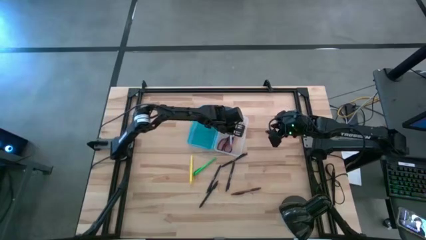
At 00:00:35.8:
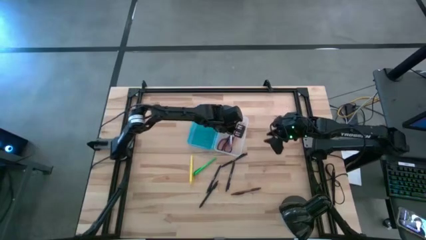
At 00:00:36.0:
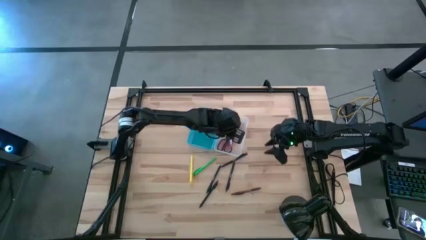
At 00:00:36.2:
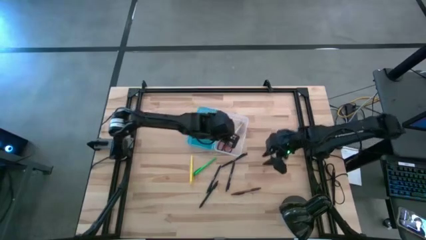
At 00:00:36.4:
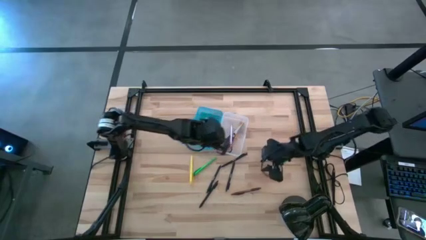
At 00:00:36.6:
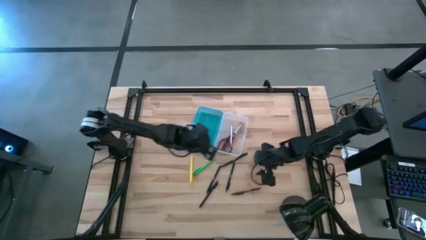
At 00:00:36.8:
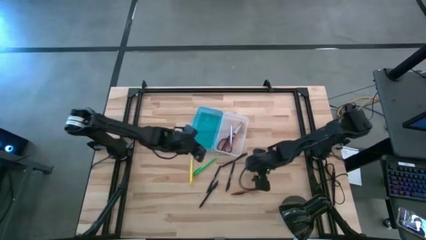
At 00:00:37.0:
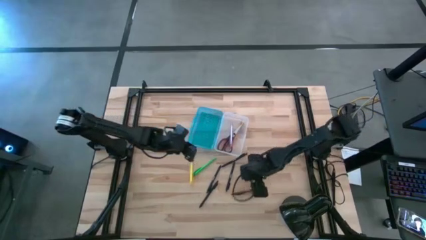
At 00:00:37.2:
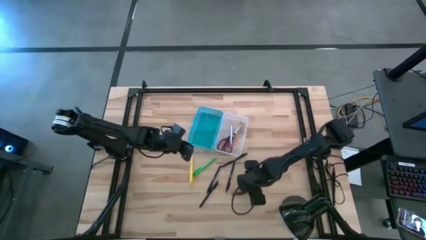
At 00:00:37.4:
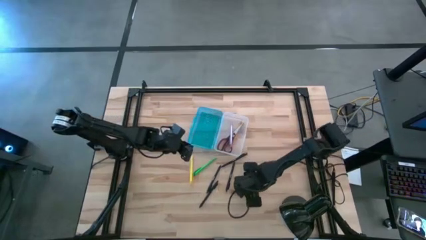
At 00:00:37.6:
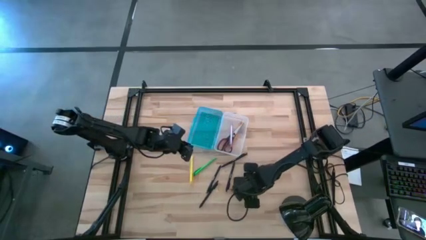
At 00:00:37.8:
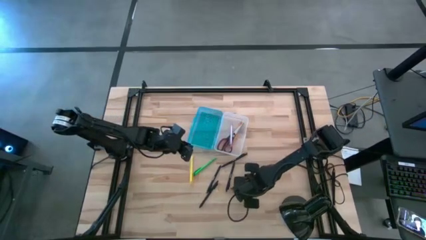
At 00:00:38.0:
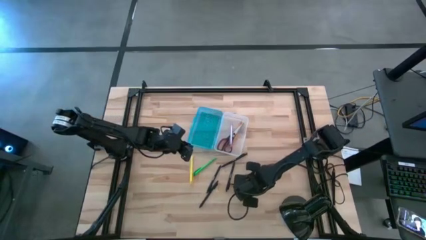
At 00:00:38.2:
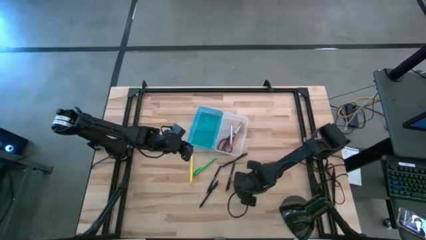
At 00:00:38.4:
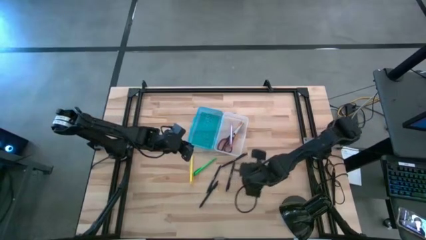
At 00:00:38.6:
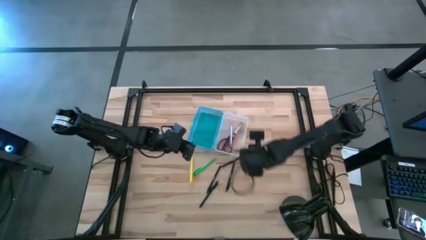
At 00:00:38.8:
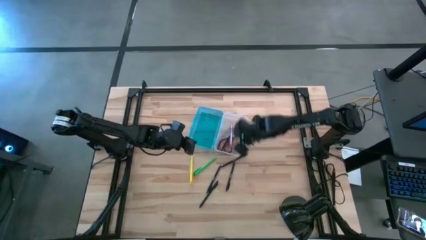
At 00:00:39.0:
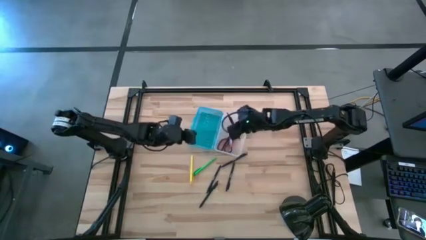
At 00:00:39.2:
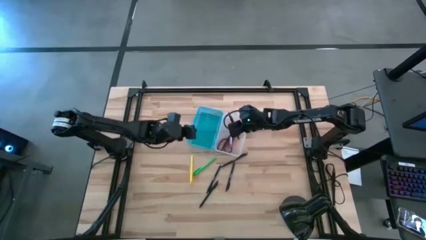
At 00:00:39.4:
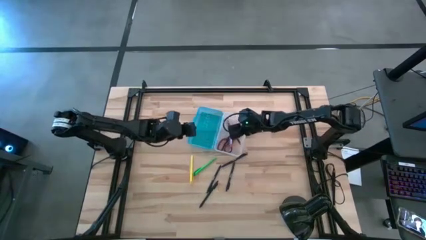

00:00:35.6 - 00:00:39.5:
Task: Pick & place school supplies into a supply box
Put the brown pen into the supply box

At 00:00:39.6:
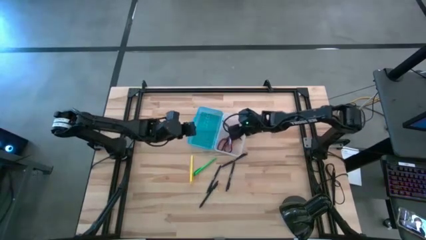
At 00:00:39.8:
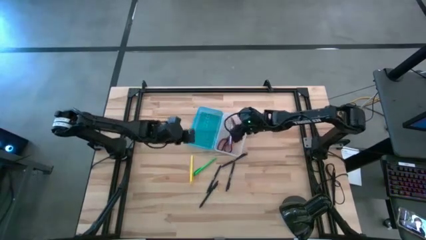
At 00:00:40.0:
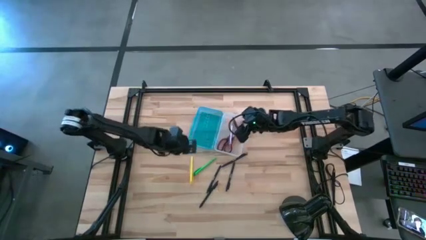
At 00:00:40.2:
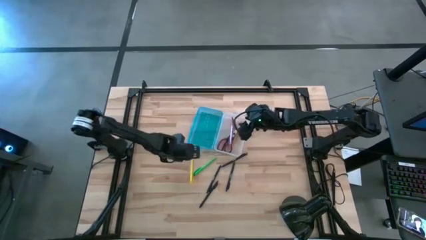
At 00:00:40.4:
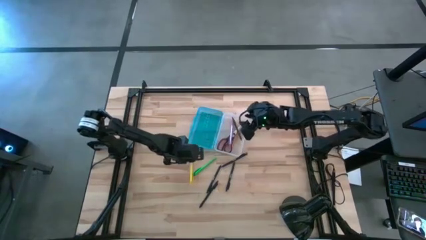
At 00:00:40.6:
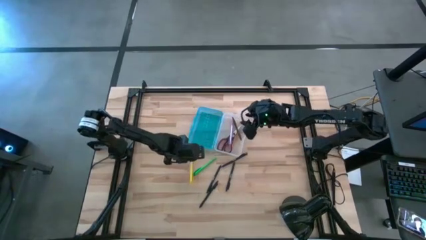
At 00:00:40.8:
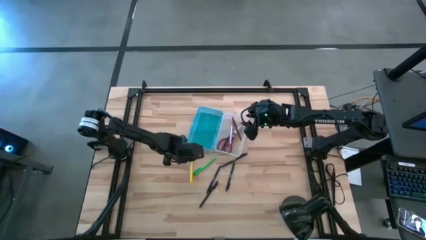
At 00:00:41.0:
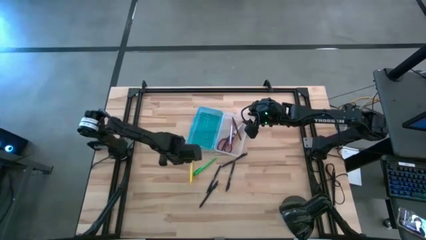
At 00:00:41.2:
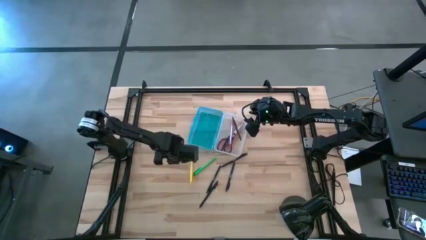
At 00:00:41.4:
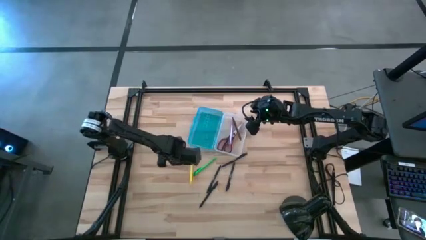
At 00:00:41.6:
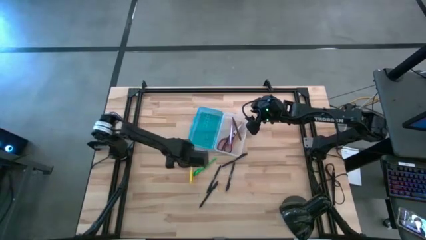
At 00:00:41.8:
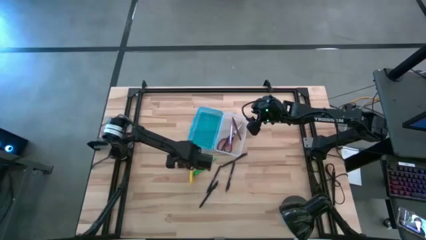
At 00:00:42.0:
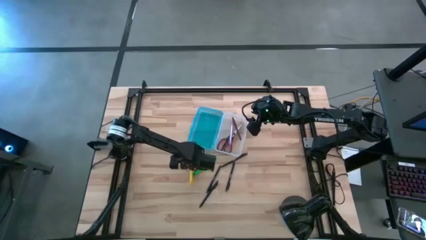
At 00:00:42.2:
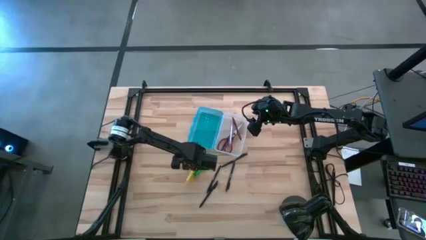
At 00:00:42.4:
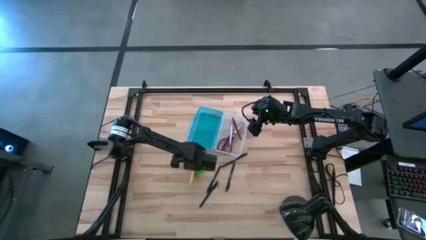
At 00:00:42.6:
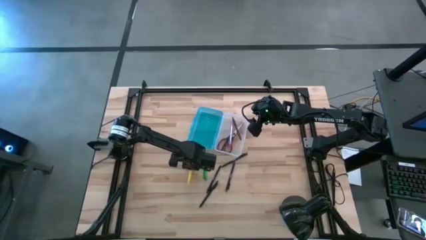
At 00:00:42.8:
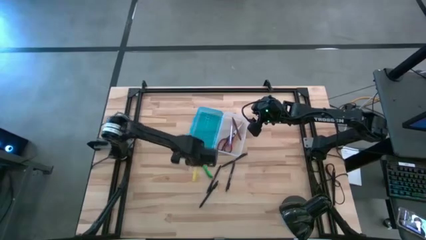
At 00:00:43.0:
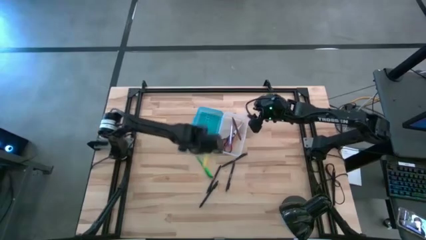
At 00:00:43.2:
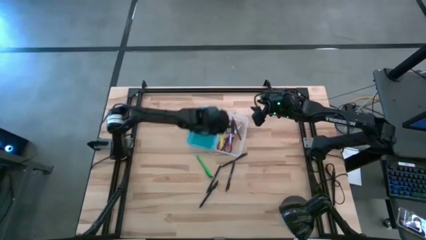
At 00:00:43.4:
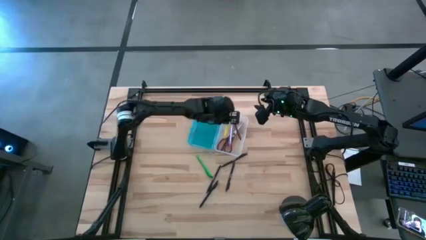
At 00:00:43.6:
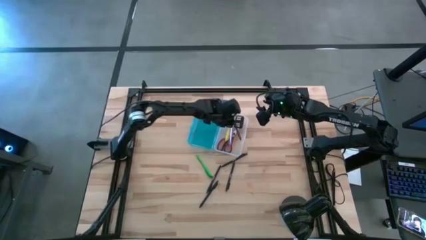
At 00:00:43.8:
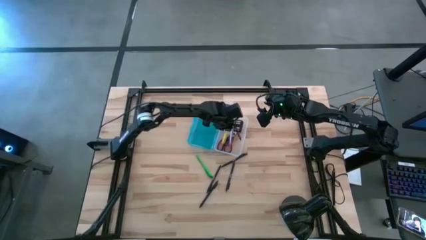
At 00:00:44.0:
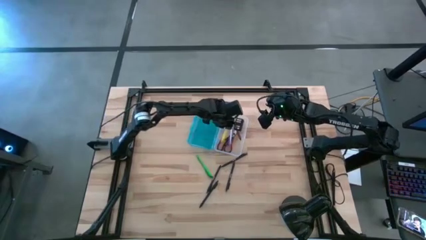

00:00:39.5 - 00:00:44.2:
Put the yellow pen into the supply box

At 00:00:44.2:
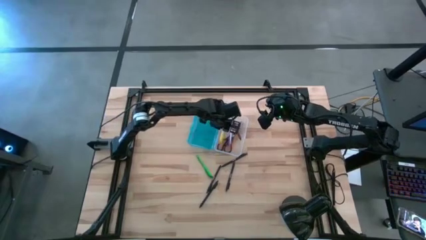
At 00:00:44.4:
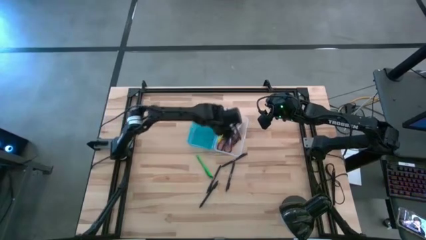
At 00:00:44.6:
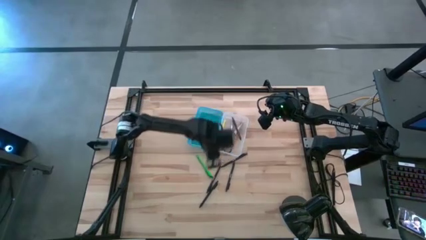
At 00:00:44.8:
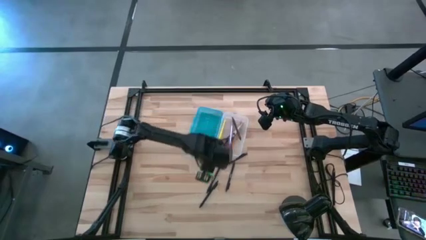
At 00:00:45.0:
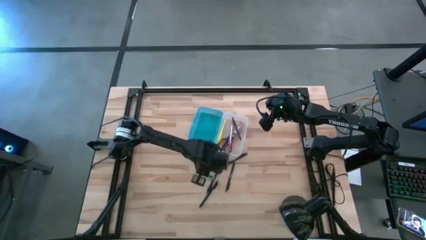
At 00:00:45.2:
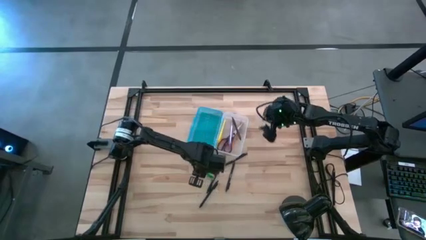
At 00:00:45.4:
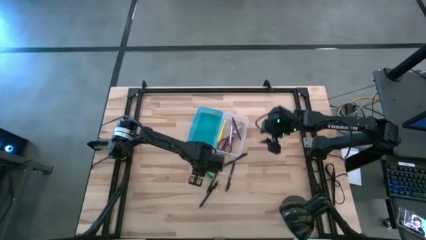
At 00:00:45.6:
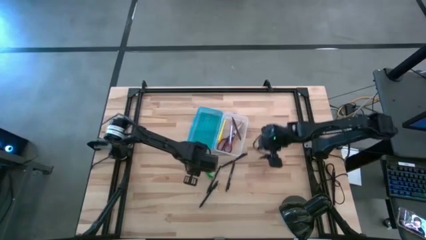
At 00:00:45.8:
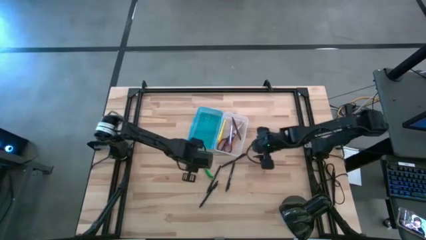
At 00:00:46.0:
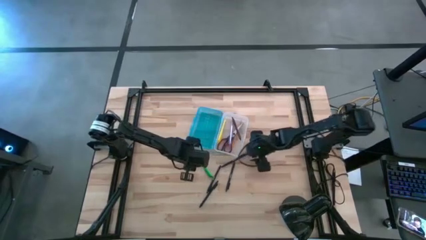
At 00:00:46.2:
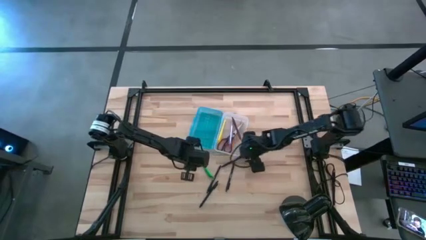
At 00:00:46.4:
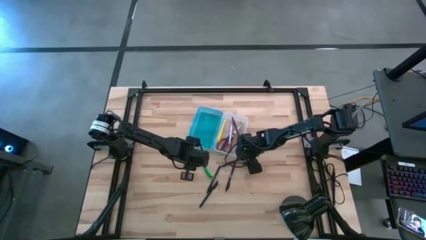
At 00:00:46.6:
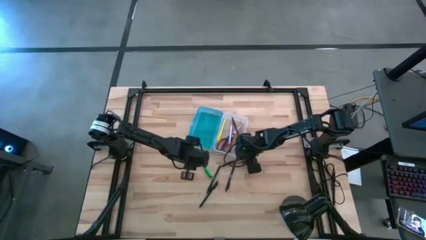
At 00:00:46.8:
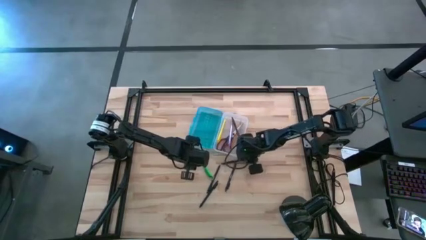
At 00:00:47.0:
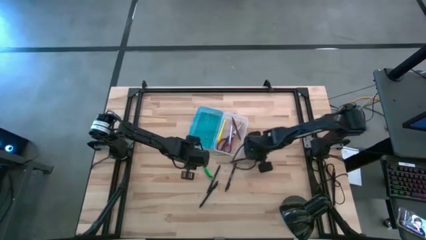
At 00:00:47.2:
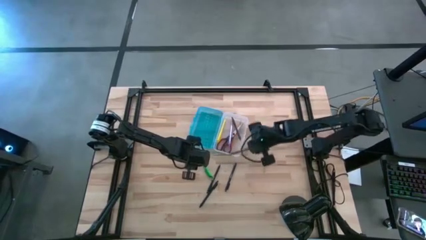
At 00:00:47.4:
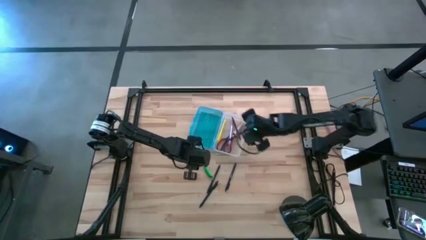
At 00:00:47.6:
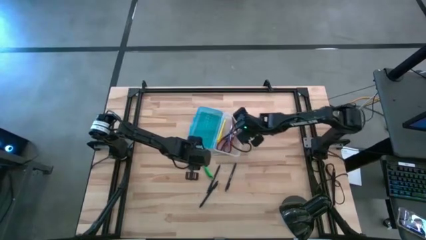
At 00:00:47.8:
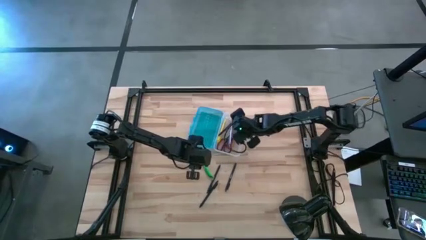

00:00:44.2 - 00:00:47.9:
Put the black pen into the supply box

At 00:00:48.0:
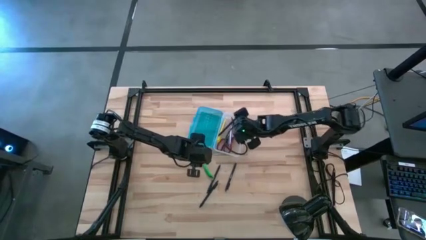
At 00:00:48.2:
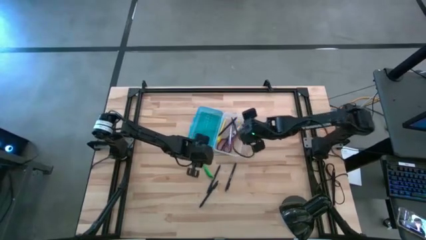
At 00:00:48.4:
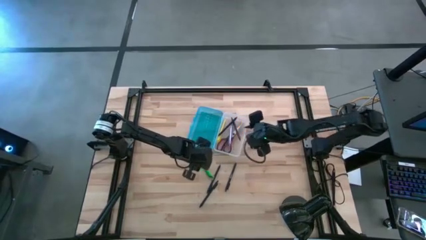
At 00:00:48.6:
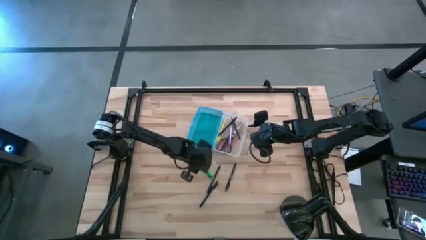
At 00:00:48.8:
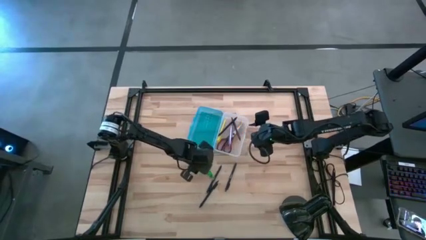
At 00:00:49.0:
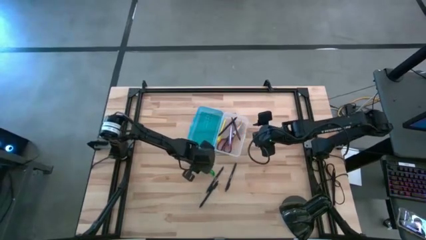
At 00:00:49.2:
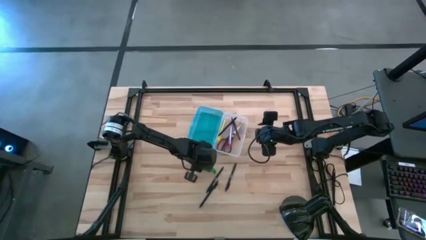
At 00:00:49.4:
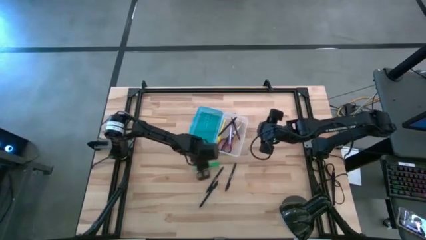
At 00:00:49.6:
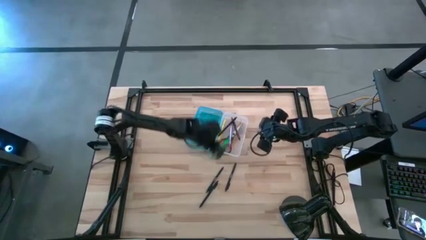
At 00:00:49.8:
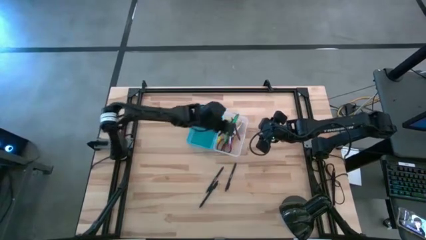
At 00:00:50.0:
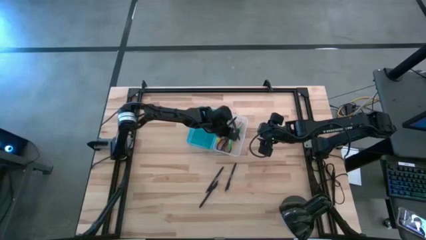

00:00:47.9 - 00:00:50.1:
Put the green pen into the supply box

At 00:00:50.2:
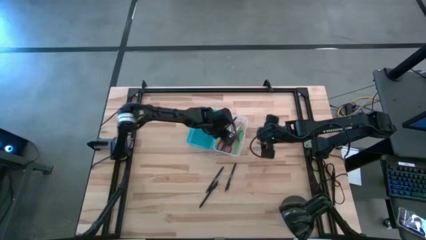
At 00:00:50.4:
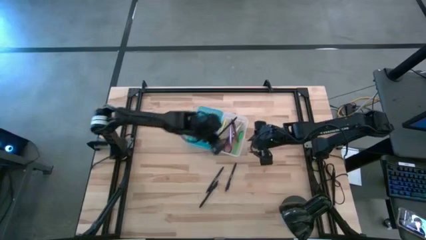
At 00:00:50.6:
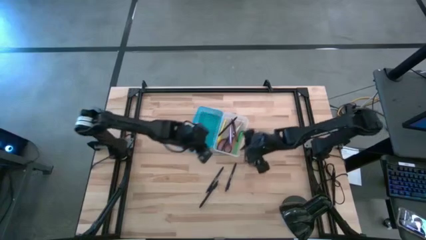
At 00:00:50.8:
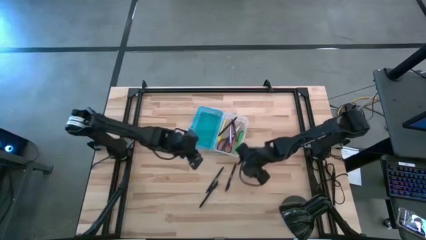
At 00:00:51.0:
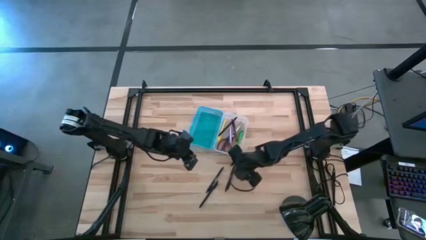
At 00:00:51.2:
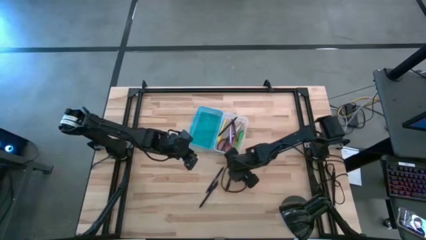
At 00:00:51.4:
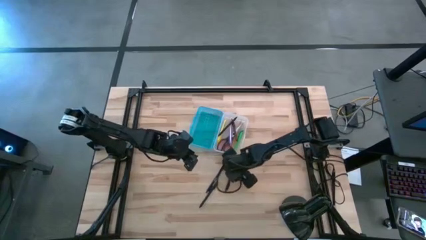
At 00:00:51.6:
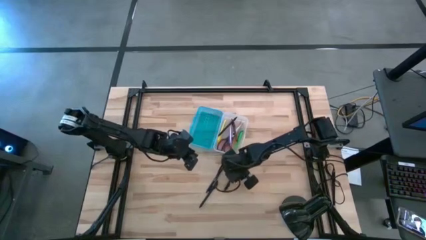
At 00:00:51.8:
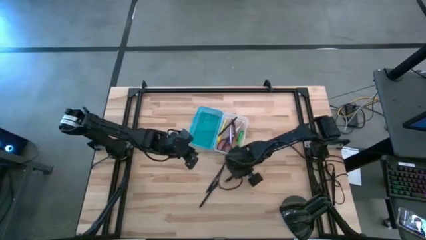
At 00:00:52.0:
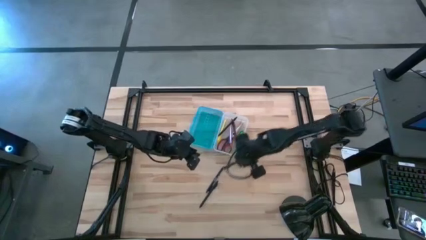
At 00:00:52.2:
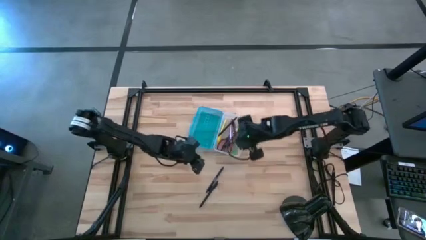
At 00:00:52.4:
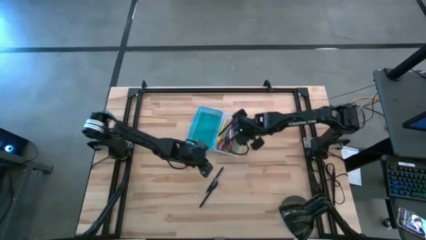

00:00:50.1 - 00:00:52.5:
Put the black pen into the supply box

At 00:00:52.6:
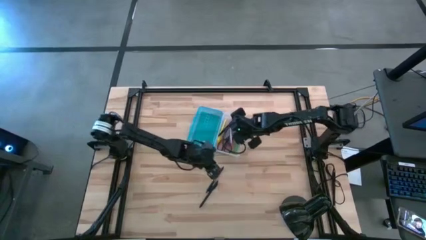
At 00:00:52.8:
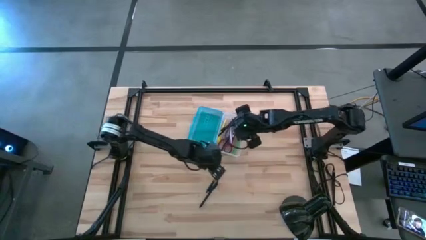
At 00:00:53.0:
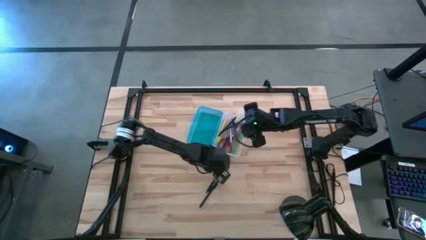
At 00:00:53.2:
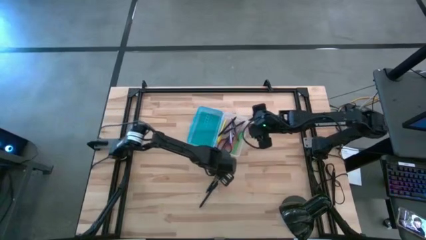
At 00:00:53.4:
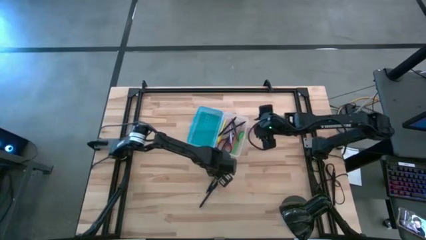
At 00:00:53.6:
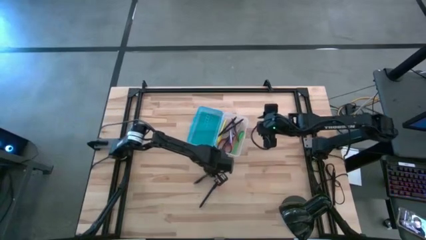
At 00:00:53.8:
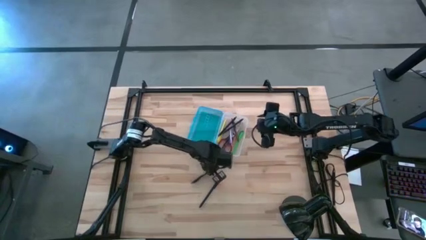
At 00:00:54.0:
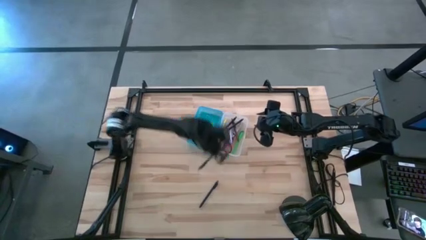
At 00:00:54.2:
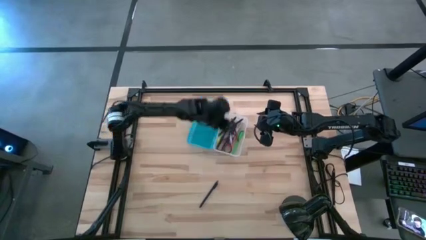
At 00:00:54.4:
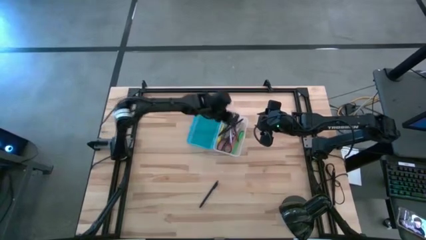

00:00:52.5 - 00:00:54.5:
Put the black pen into the supply box
